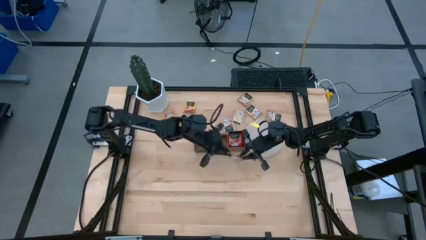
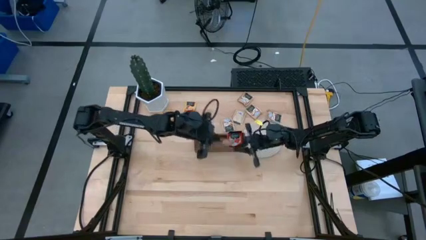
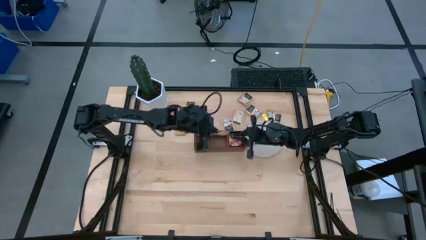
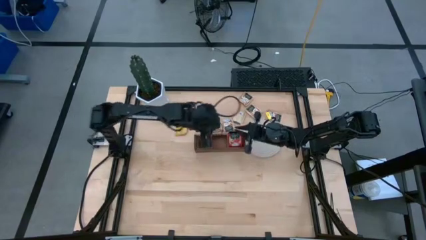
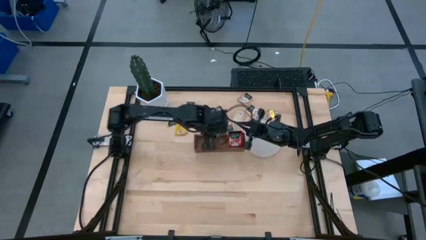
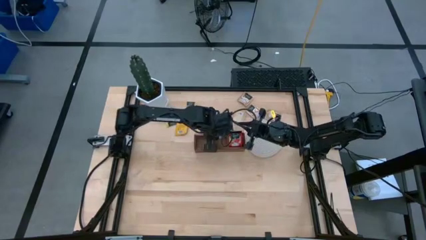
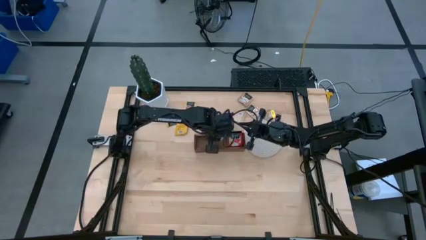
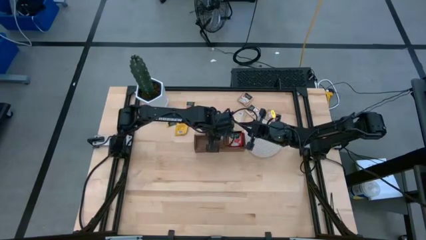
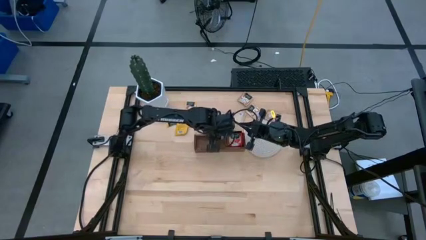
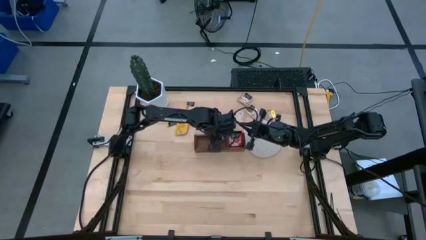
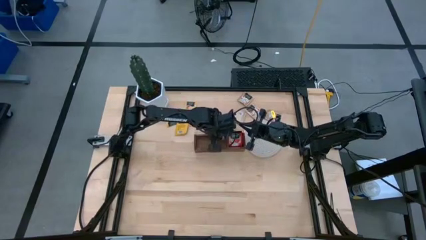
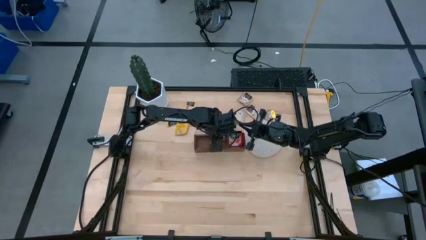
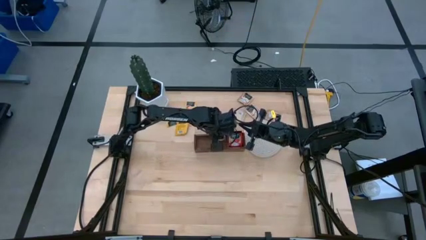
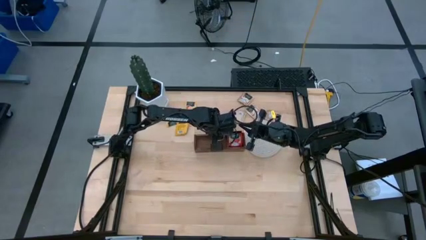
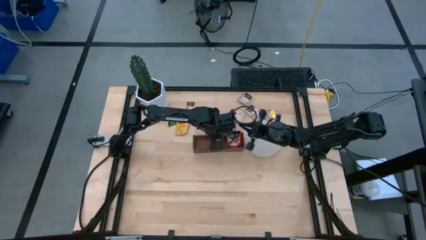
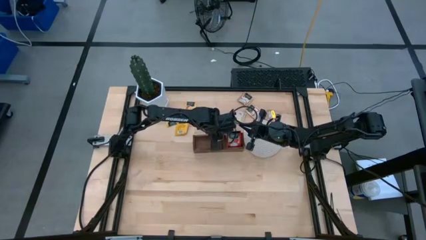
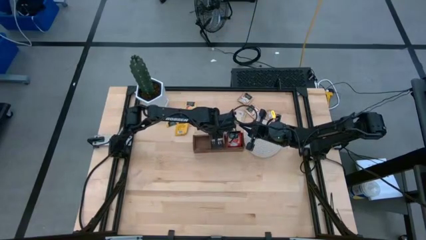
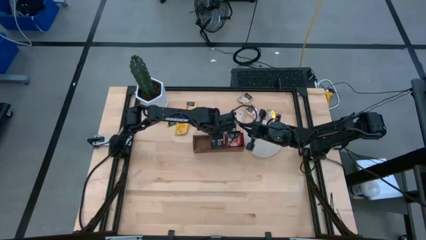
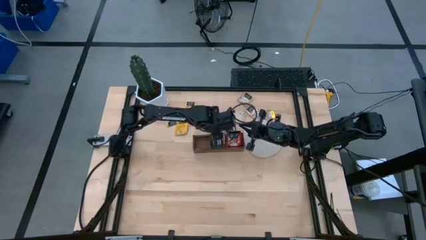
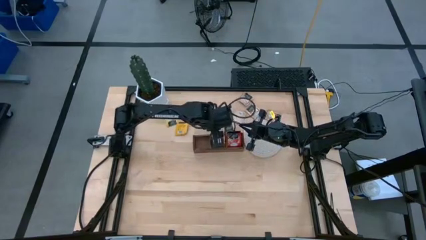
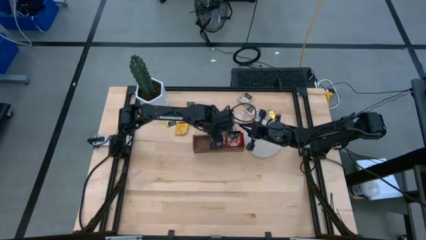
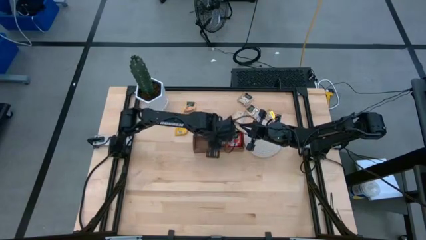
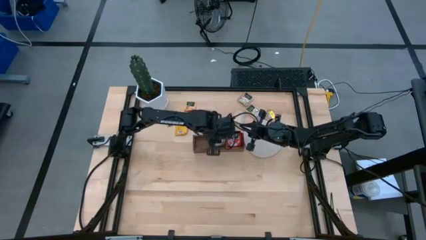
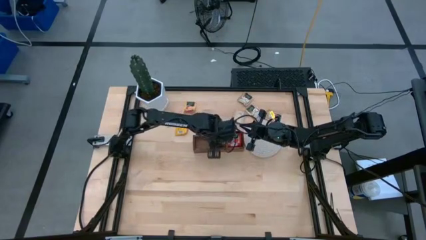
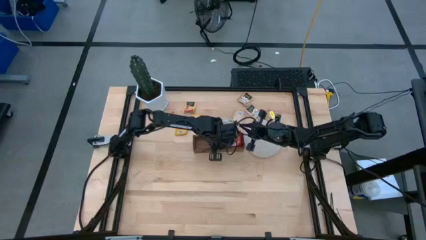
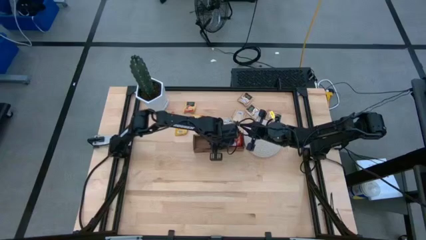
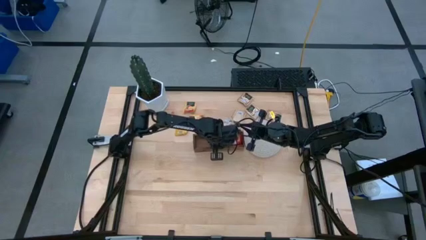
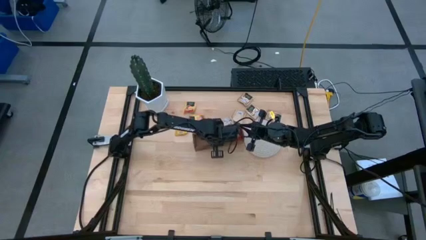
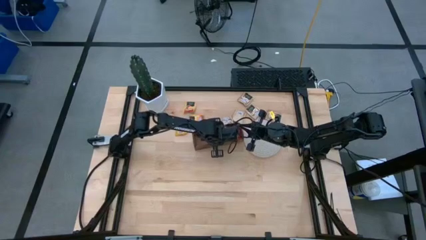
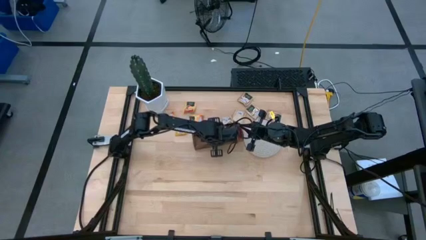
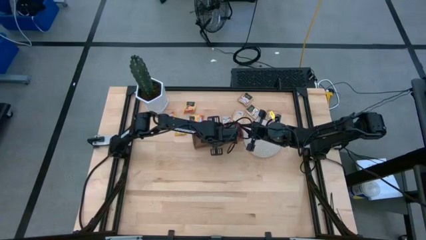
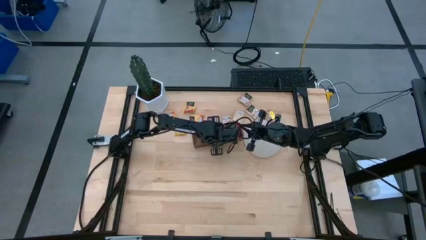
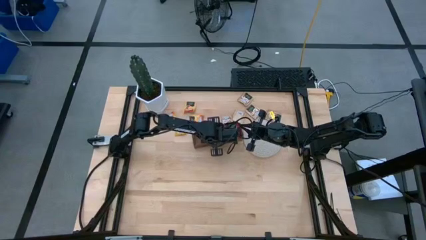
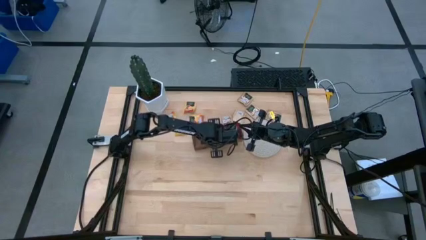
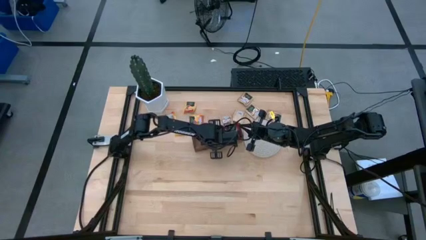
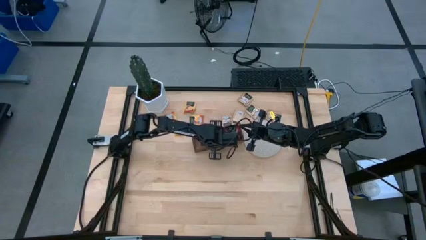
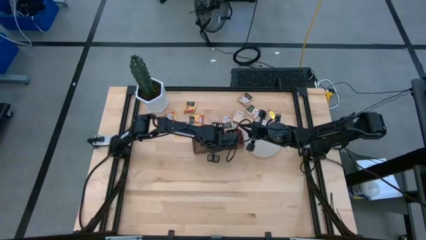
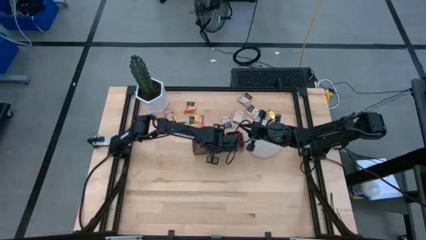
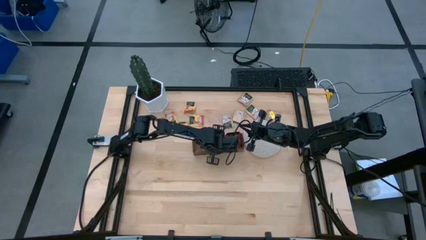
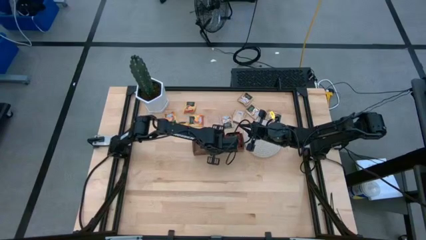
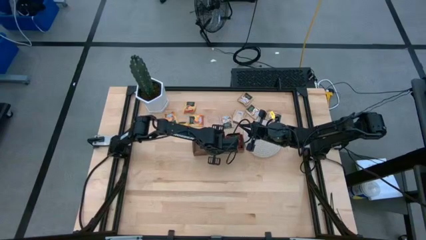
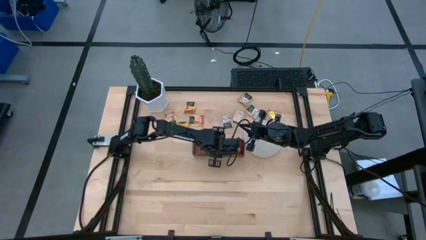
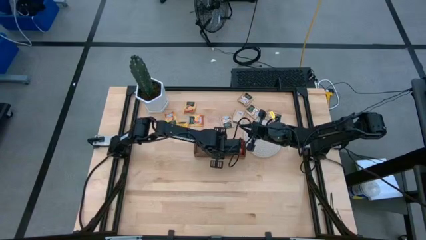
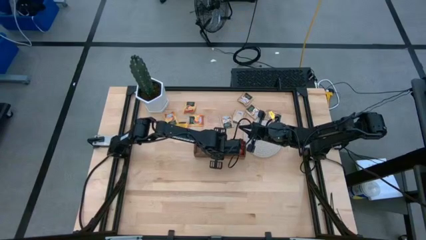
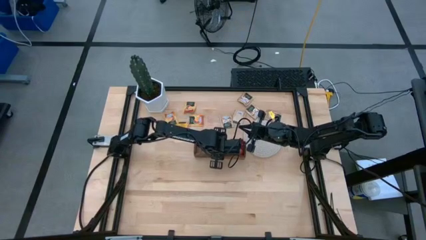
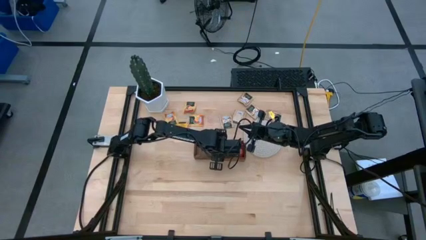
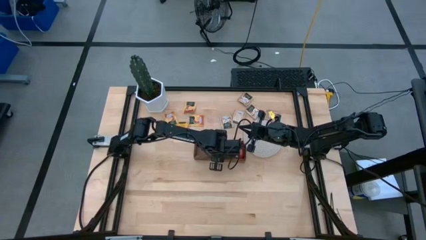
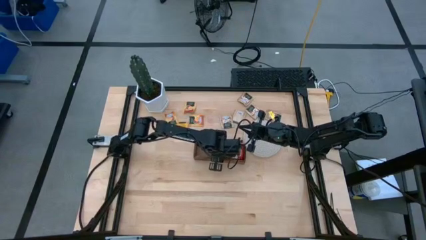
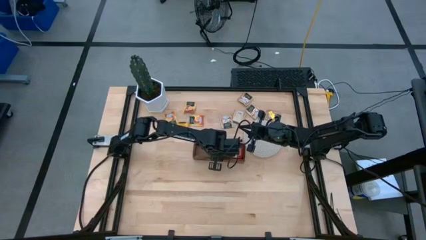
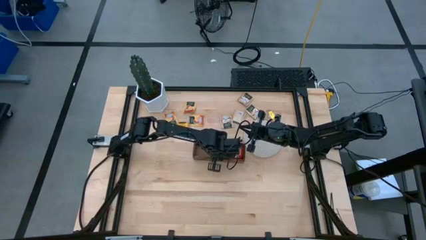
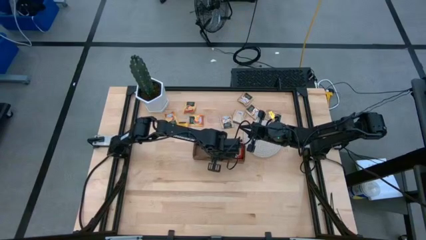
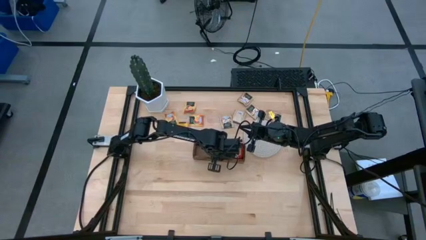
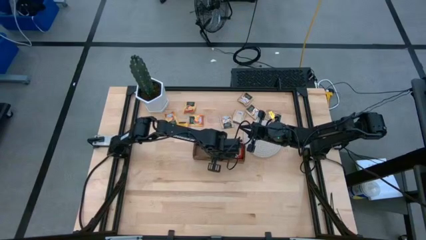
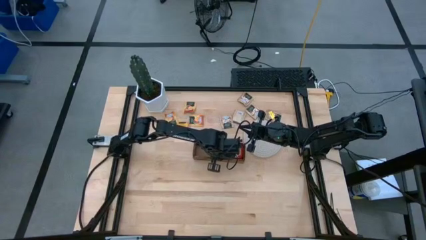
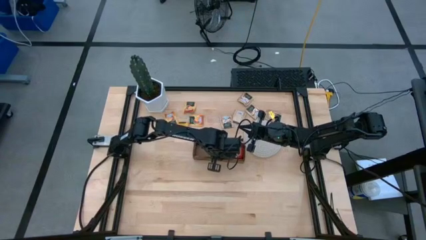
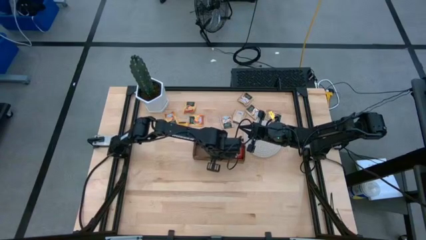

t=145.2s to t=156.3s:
Task: Pick & Place Tea
Put the brown tea bag into the middle section of the wooden organizer

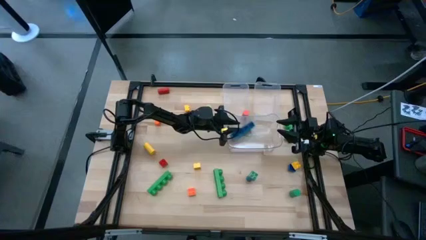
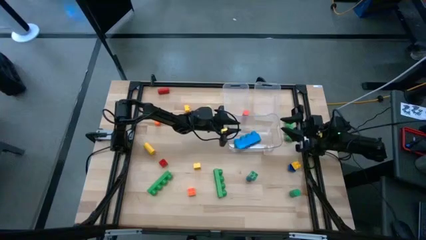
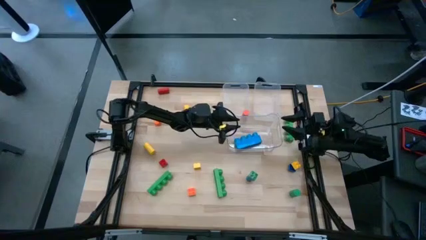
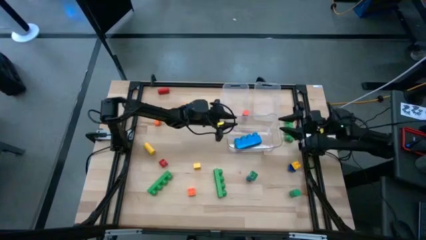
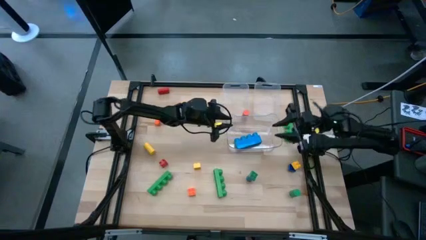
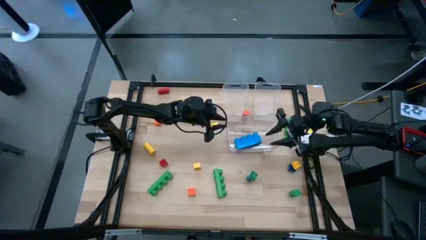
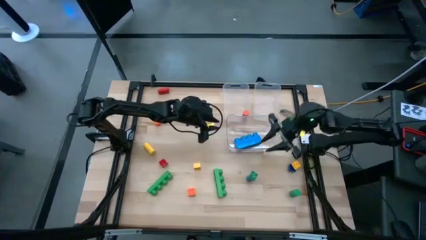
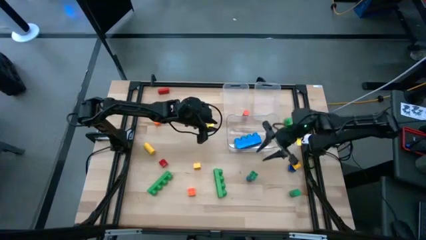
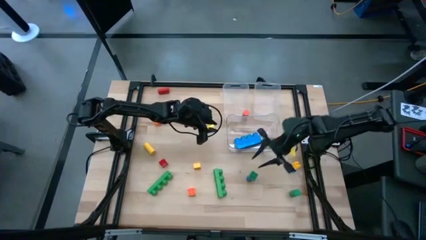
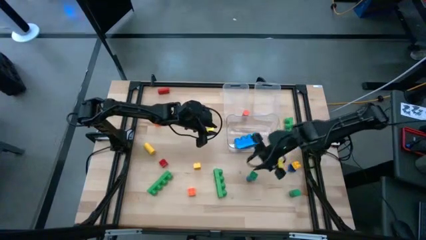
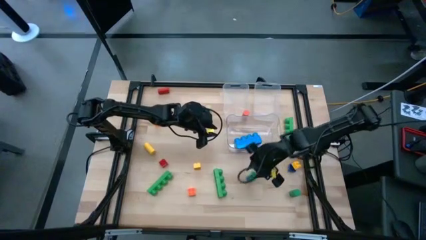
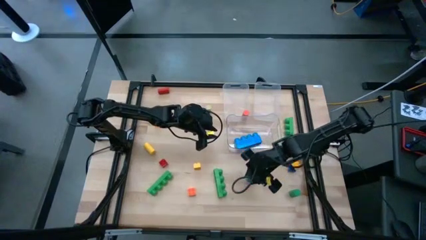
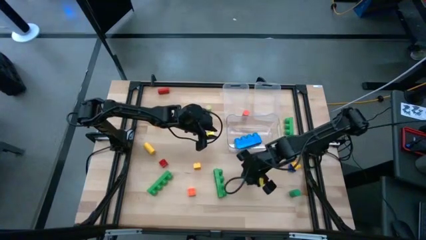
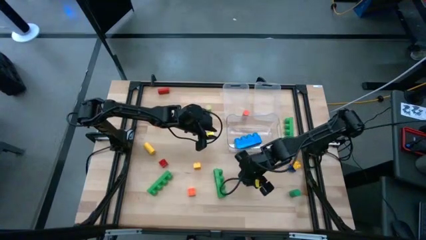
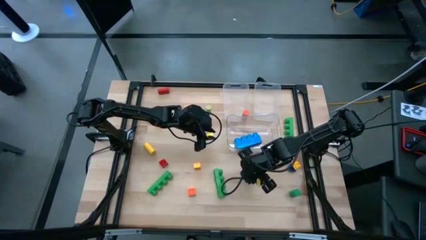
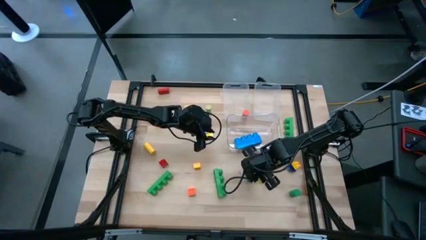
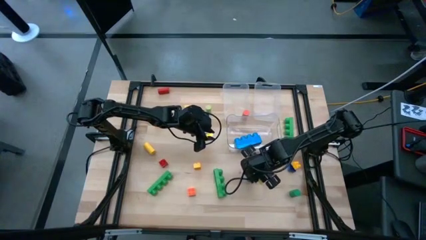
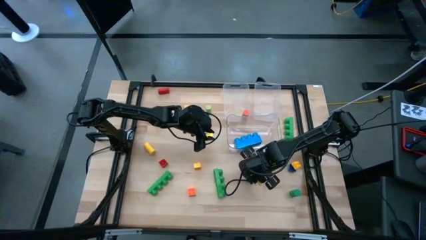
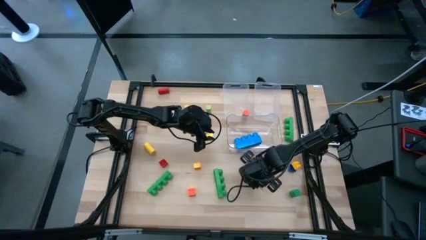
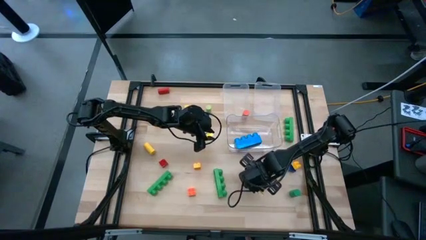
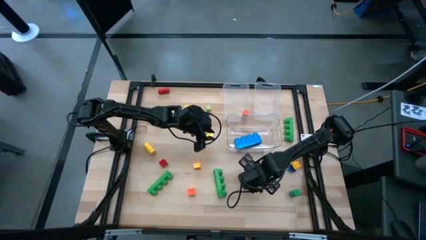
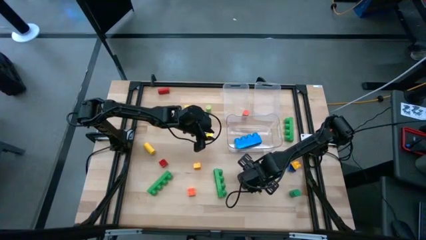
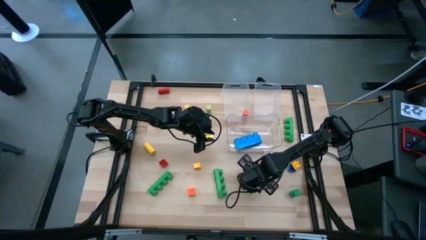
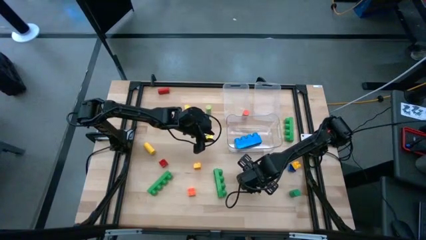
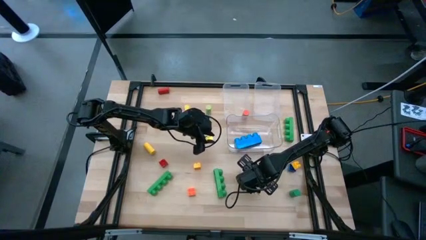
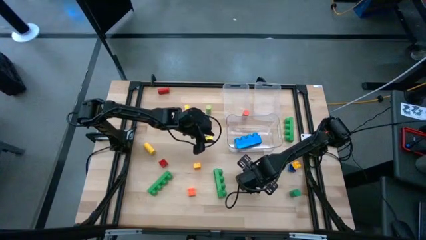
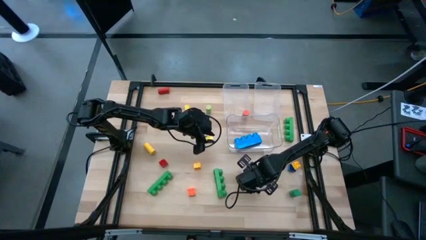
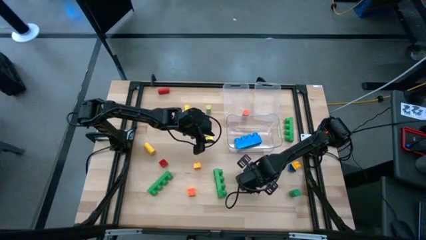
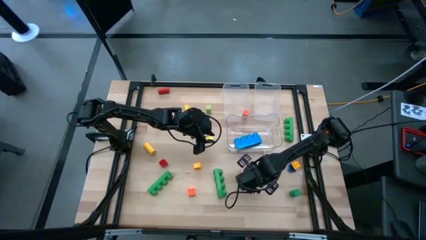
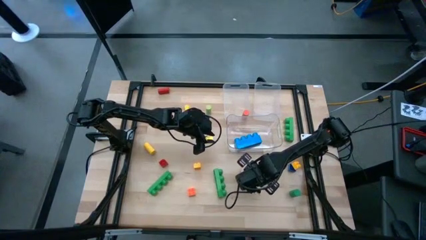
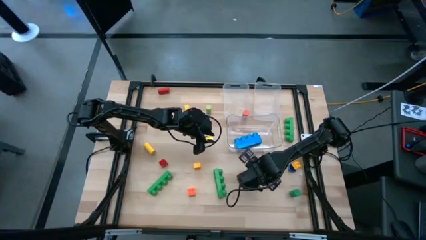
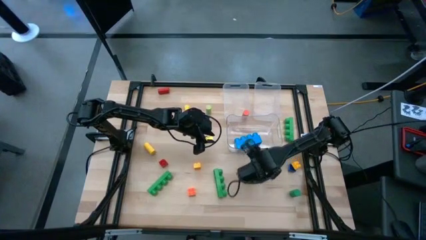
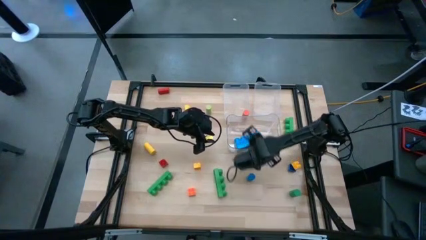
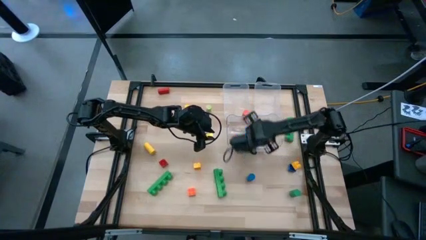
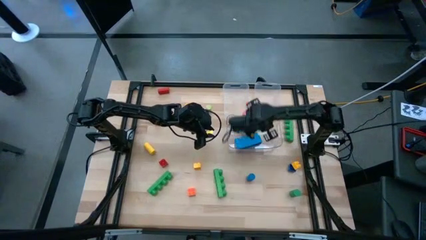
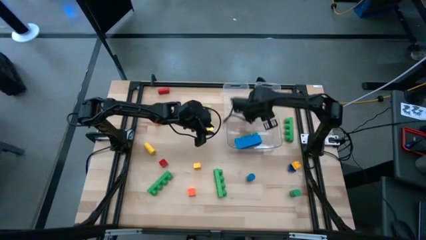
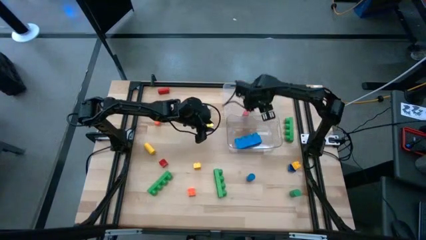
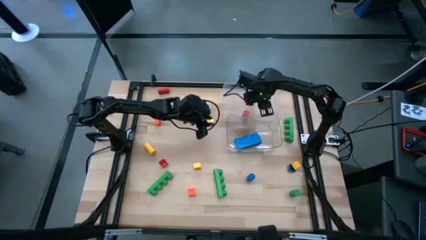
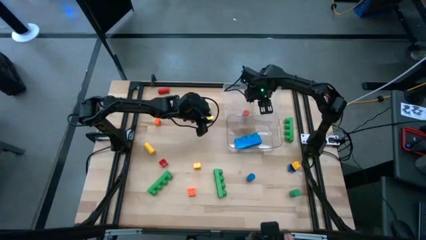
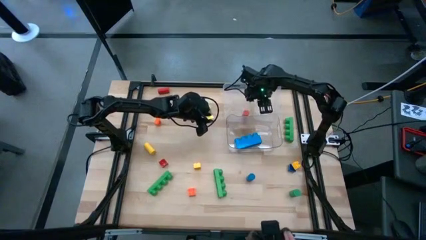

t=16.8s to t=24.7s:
Task: Sort blocks by size
Put the small green 4 stud game piece into the right transparent bin
